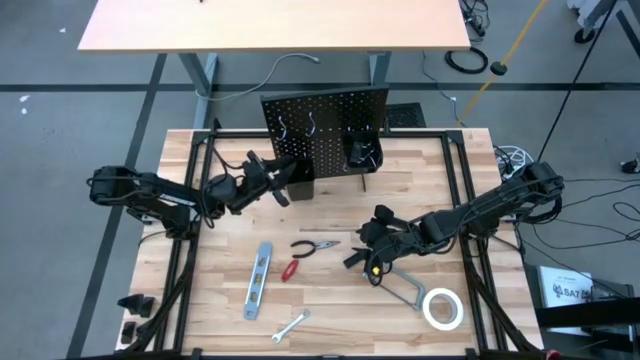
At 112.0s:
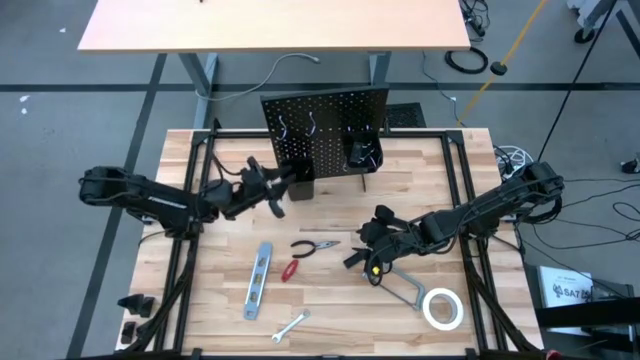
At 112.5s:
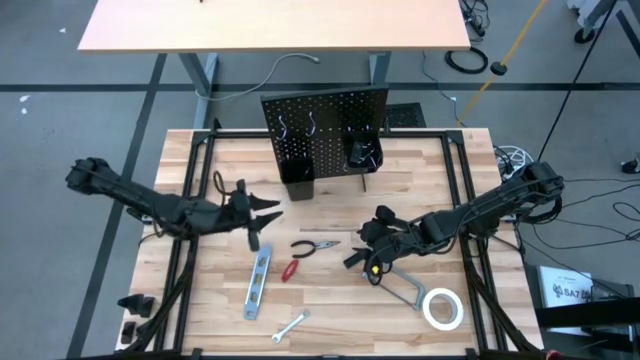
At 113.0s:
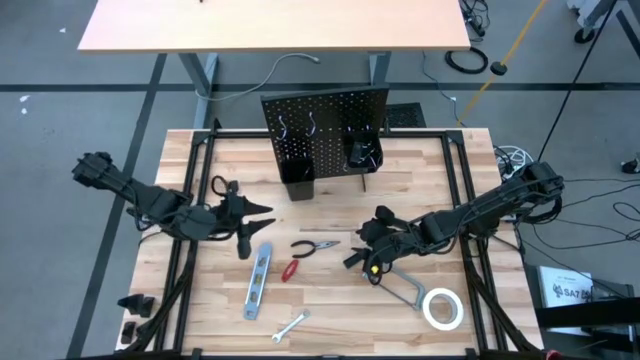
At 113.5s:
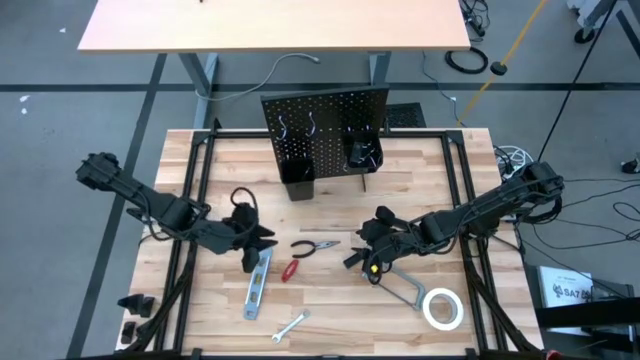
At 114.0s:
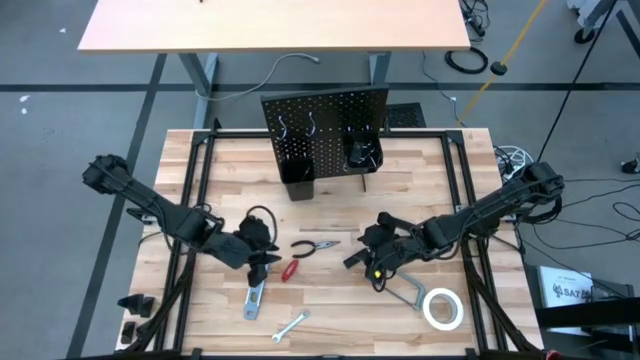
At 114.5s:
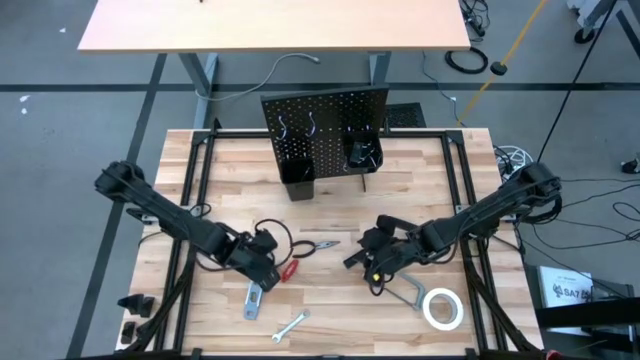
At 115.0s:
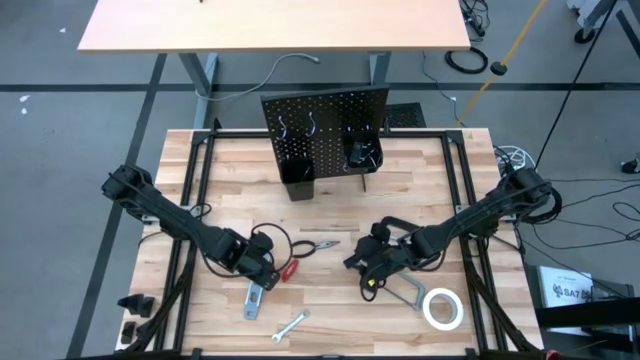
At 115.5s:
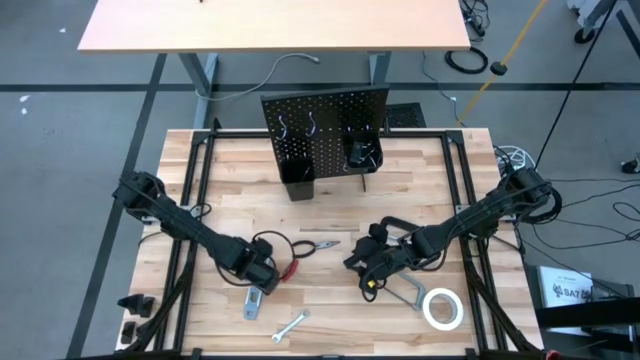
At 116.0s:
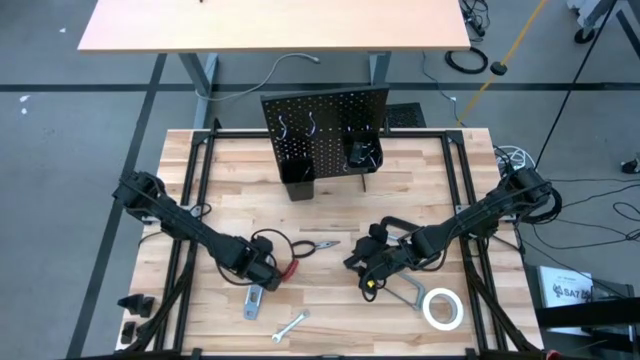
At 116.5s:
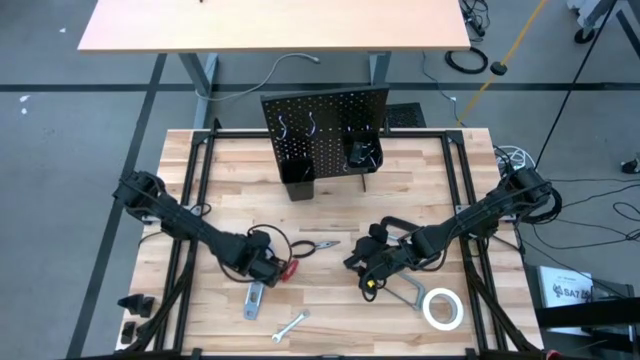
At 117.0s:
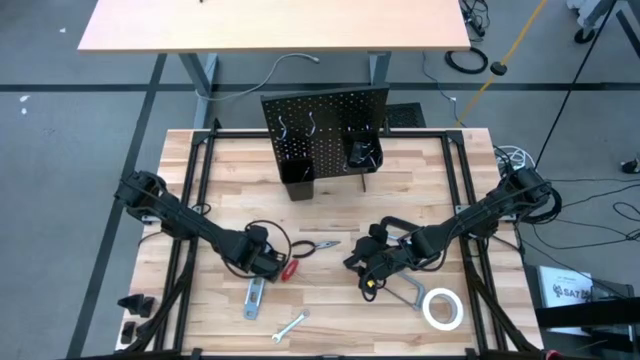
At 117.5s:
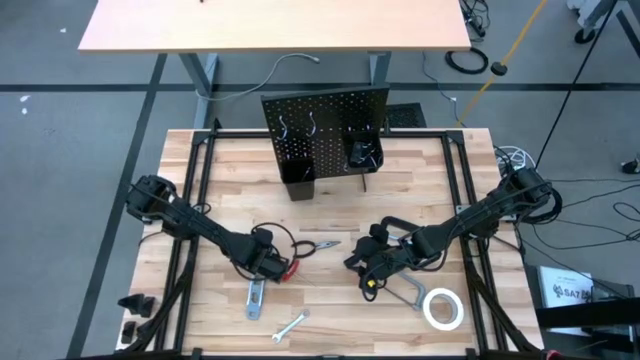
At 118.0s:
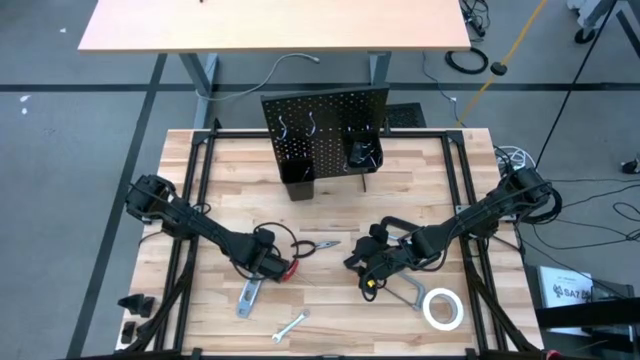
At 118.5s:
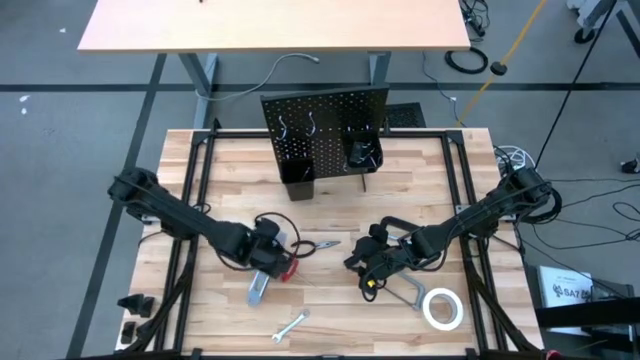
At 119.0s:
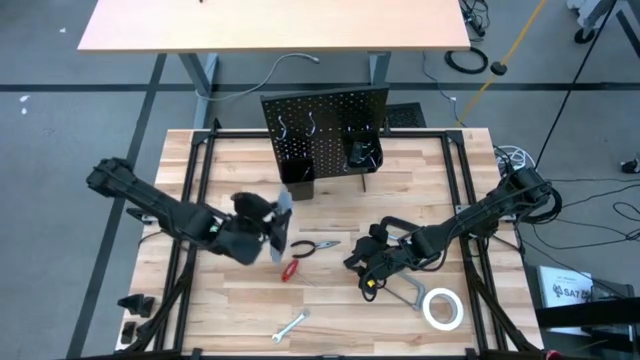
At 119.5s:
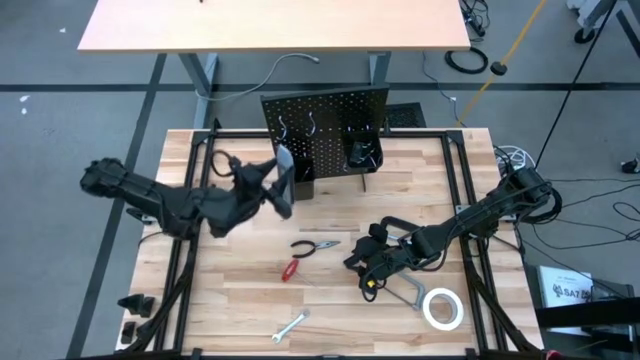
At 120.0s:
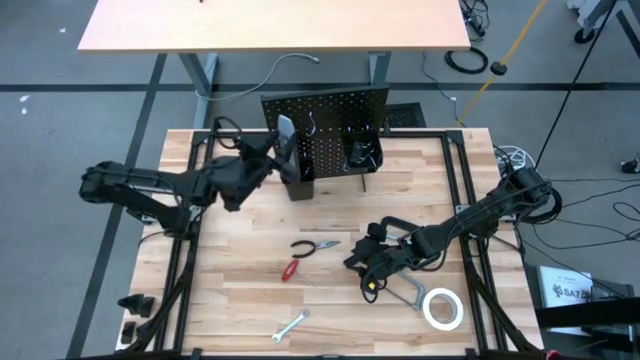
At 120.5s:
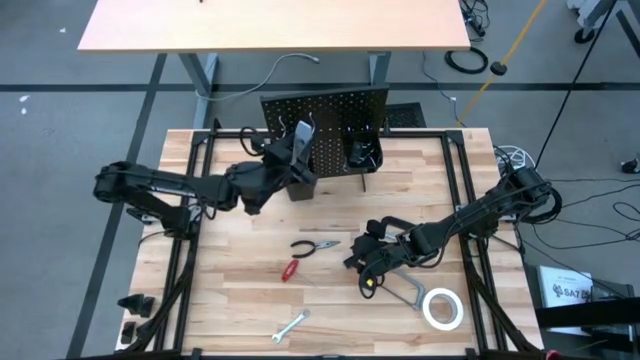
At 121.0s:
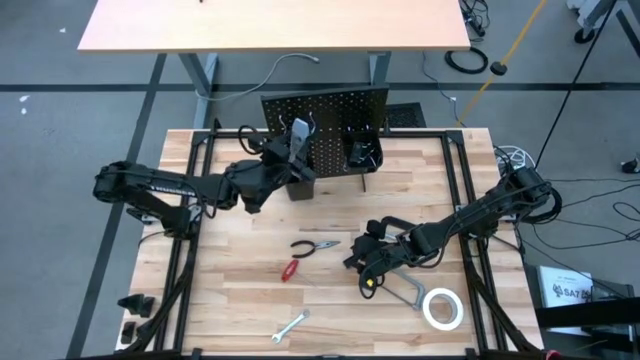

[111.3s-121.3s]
Task: Hang tools onto peg board
Put the spirit level into the left black bin on the pegboard

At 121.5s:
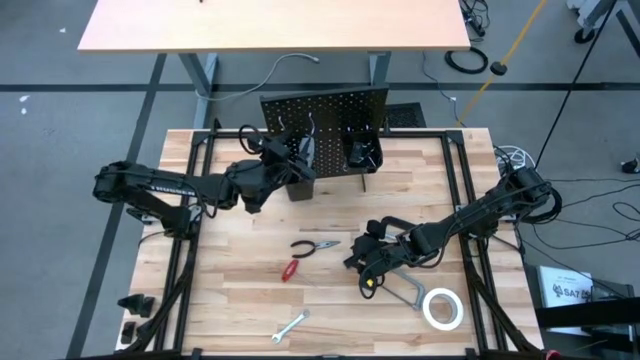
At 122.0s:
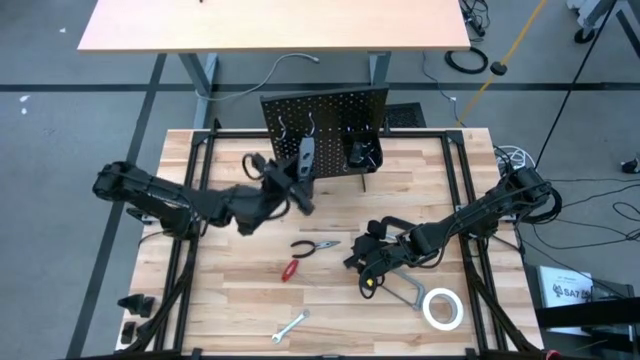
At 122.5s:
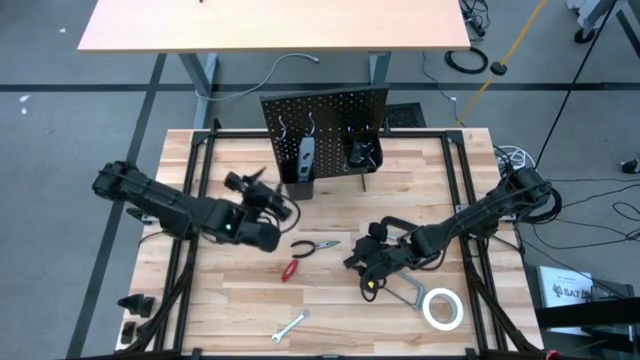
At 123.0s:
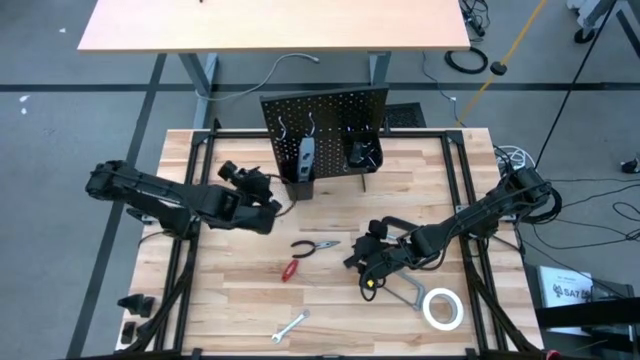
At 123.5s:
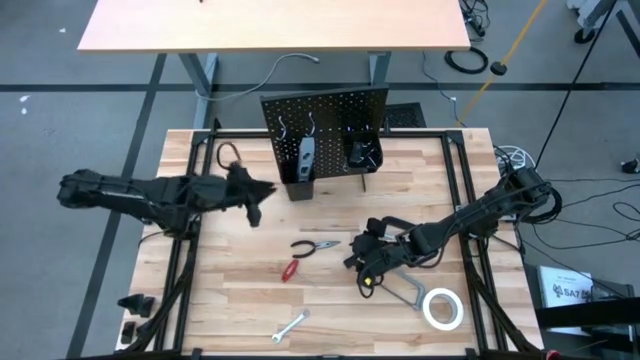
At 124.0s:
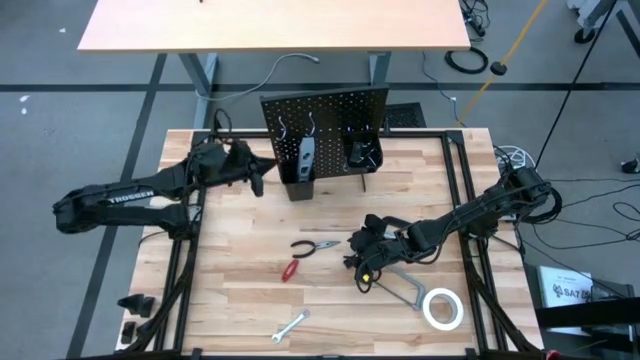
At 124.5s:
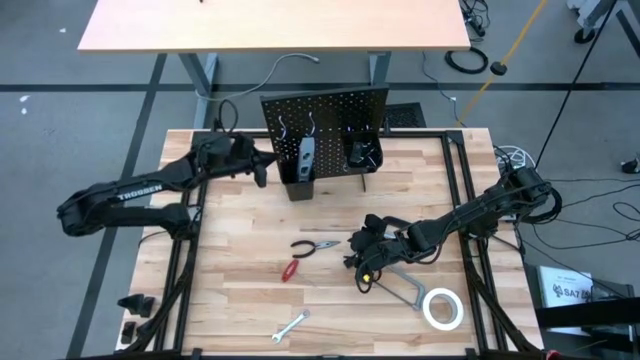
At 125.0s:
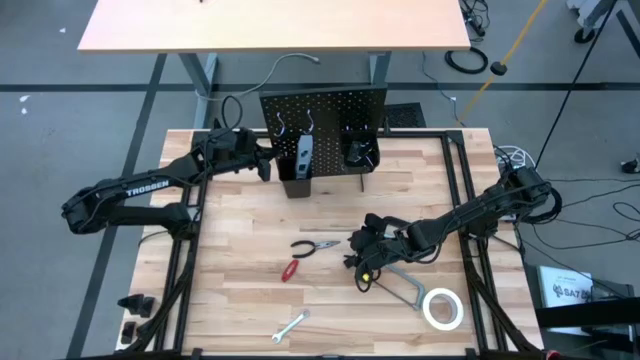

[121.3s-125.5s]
Adjust the pegboard

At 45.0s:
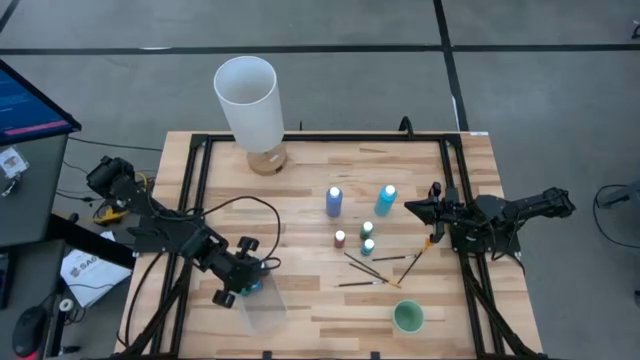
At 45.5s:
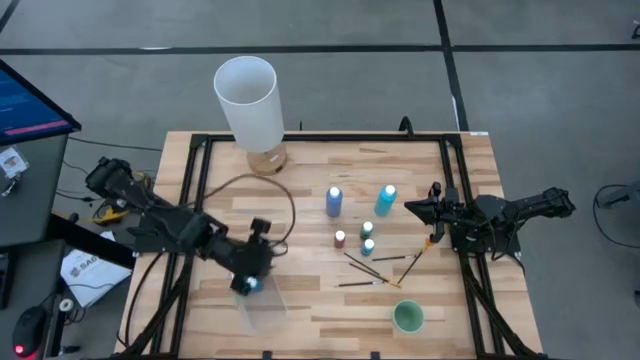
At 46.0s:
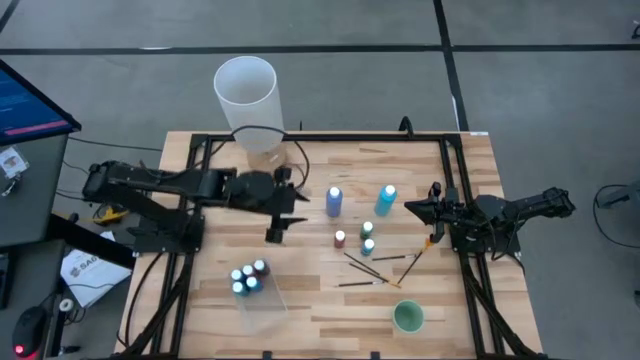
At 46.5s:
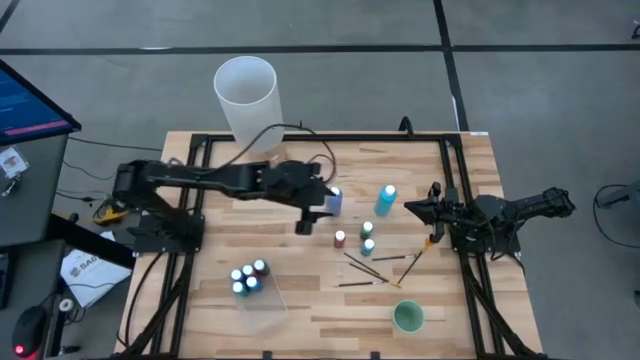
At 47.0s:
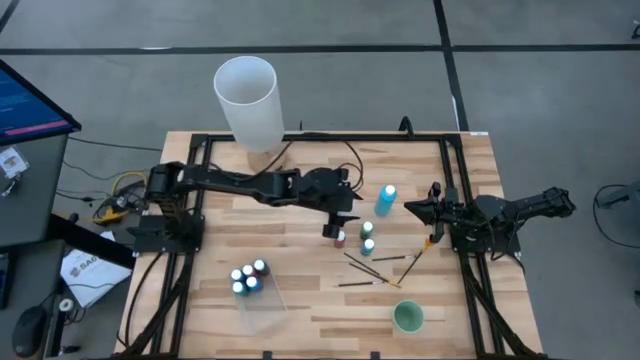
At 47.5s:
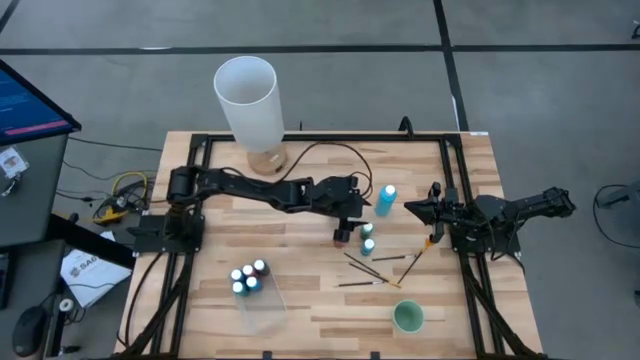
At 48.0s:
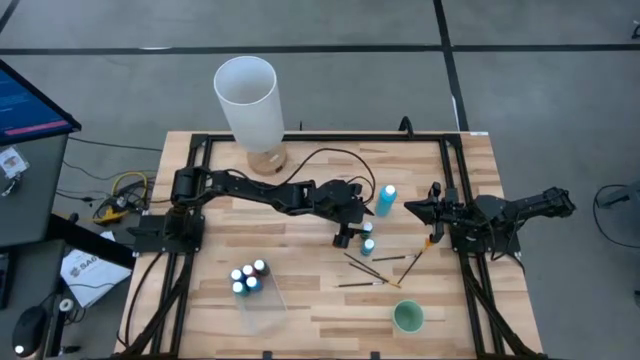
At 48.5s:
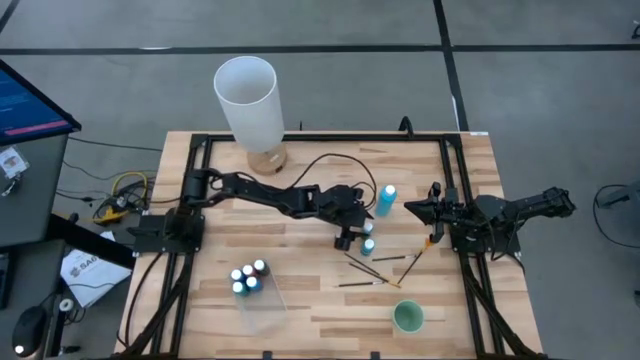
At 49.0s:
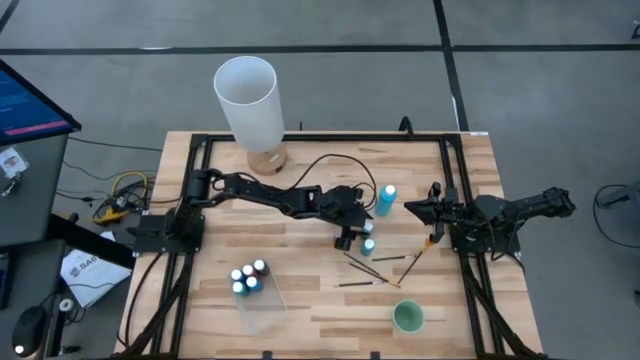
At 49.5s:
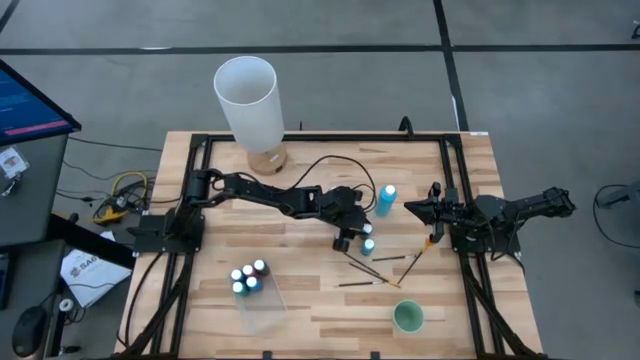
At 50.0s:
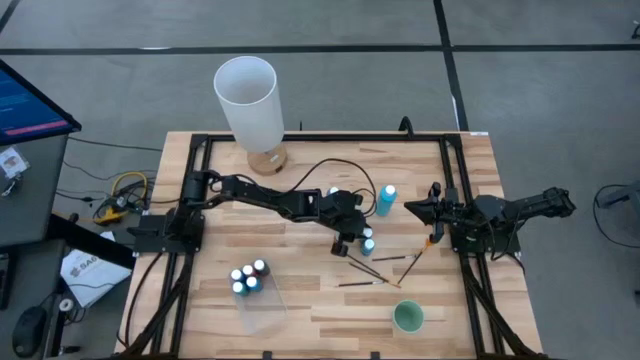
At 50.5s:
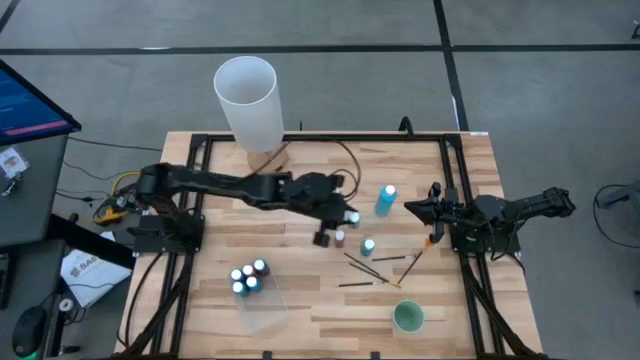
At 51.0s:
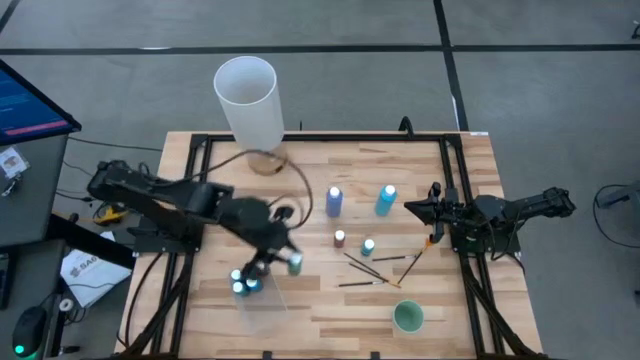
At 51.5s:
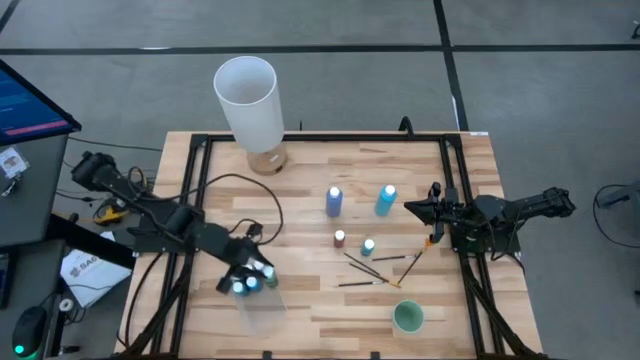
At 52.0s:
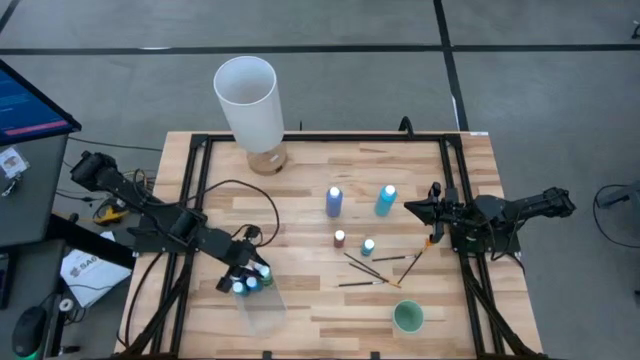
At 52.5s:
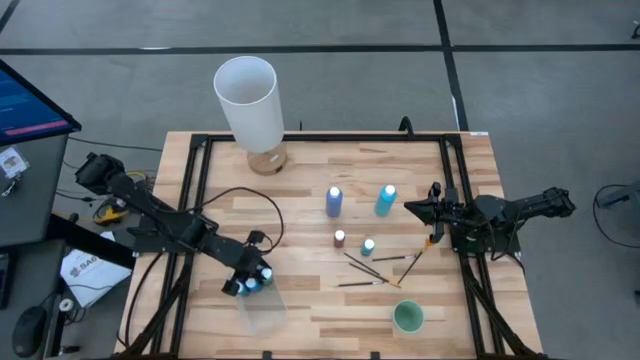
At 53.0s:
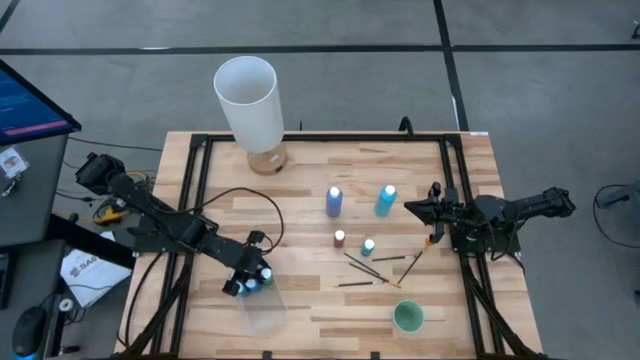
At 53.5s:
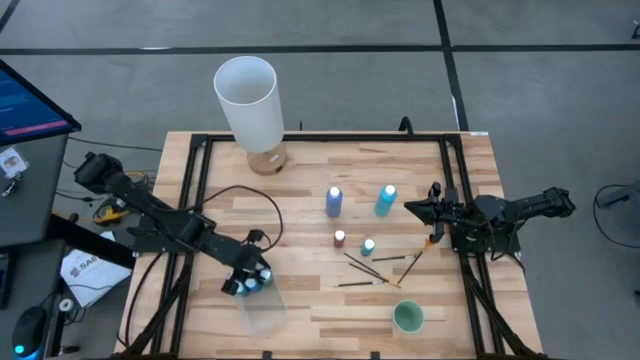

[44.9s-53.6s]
Task: Pick & Place Paint Supplies
Put the dark green paint bottle into the transparent bin
